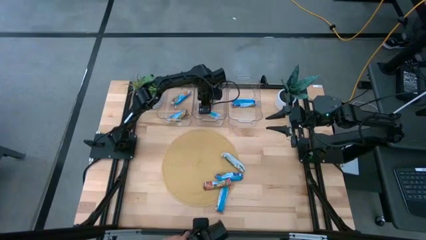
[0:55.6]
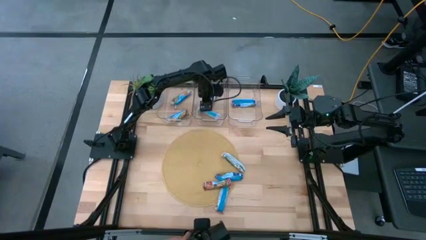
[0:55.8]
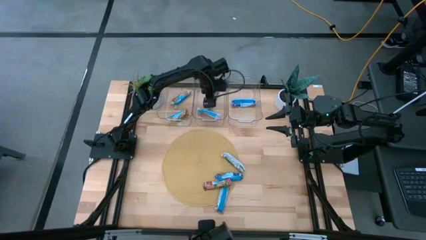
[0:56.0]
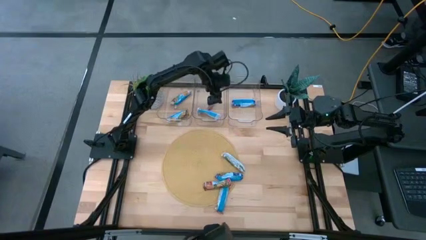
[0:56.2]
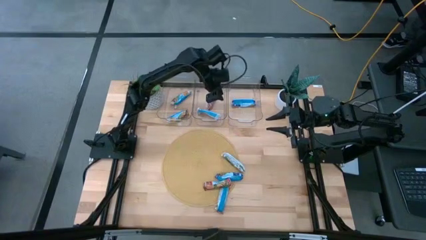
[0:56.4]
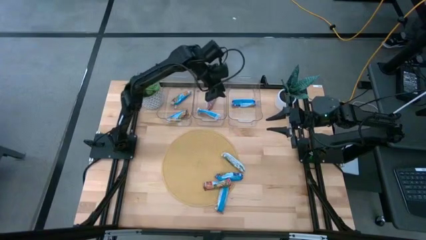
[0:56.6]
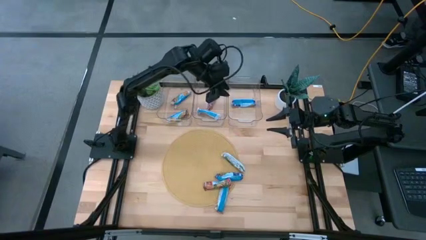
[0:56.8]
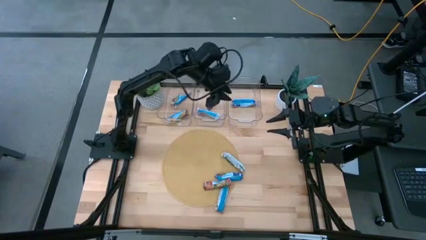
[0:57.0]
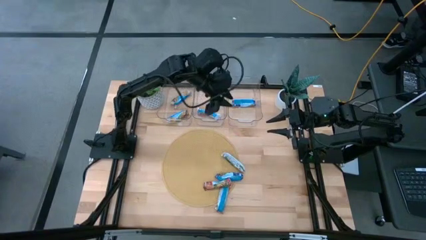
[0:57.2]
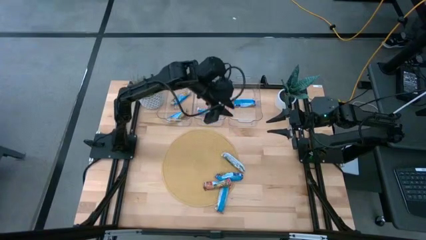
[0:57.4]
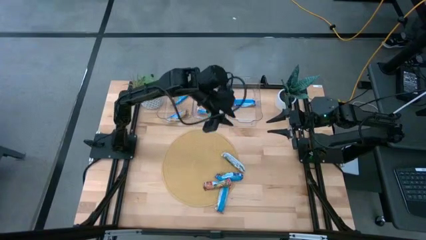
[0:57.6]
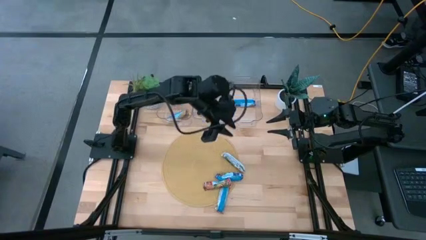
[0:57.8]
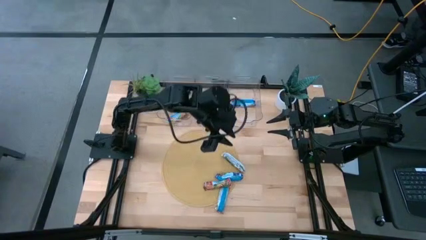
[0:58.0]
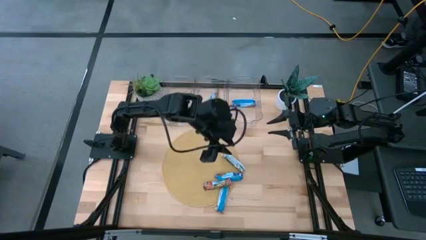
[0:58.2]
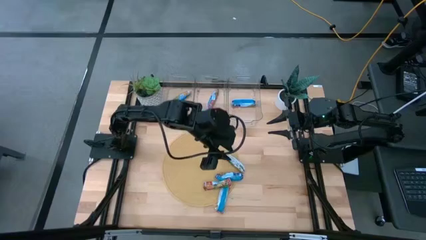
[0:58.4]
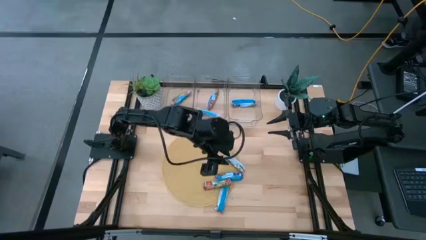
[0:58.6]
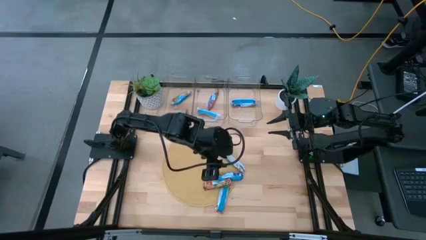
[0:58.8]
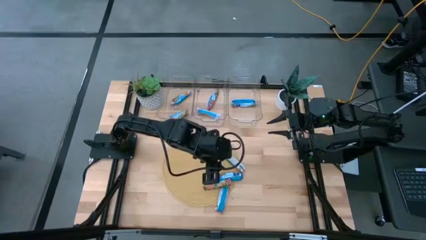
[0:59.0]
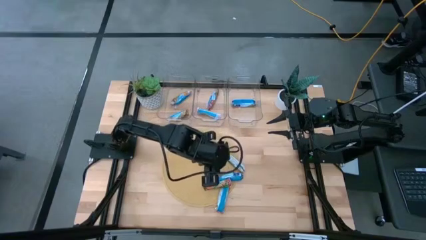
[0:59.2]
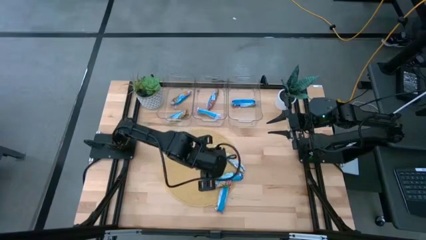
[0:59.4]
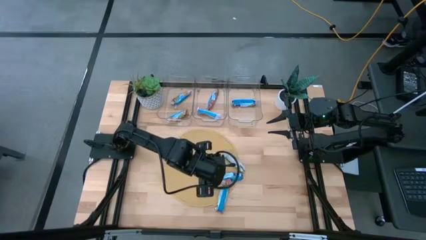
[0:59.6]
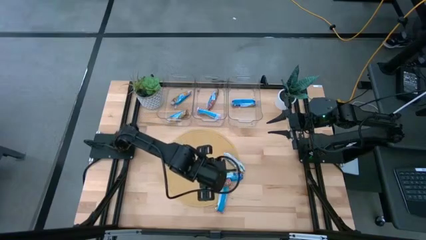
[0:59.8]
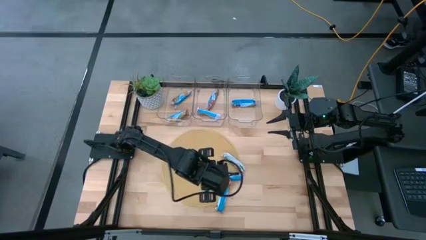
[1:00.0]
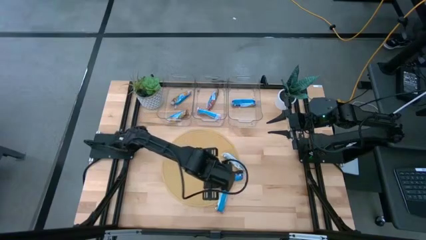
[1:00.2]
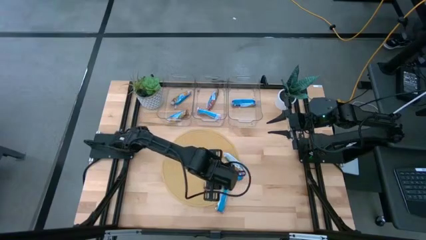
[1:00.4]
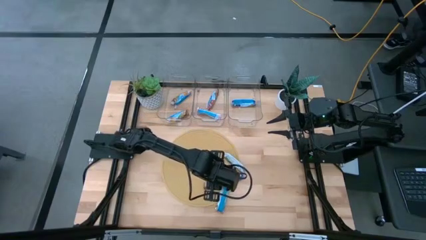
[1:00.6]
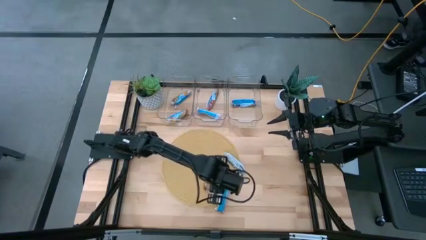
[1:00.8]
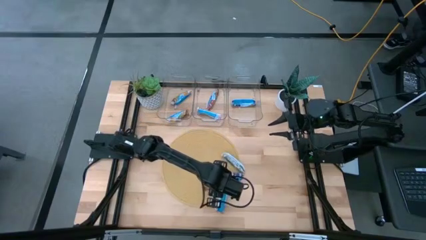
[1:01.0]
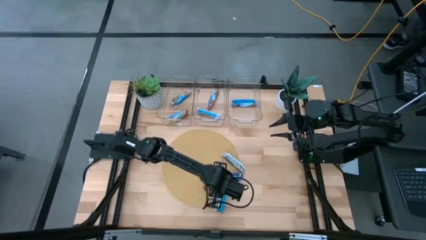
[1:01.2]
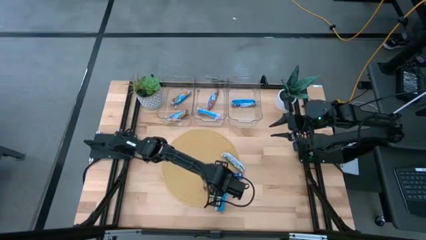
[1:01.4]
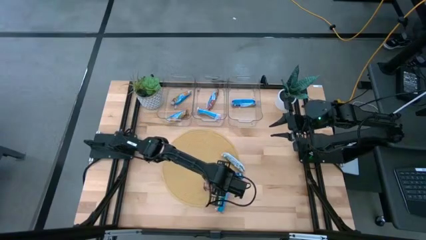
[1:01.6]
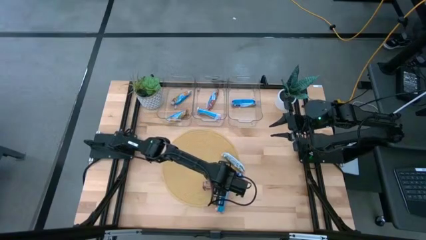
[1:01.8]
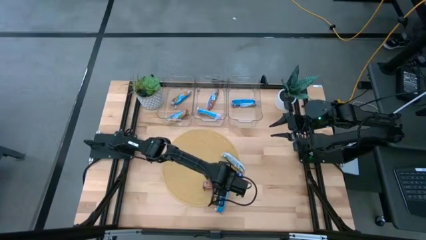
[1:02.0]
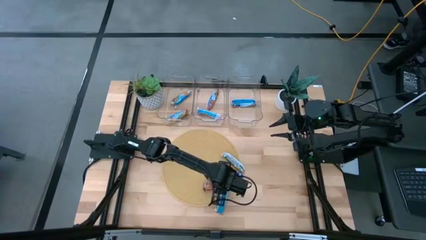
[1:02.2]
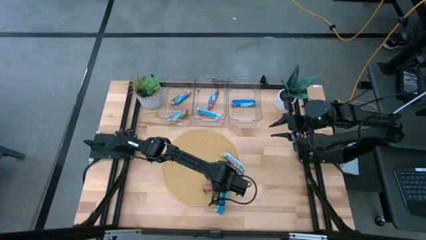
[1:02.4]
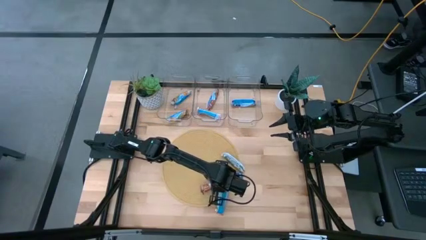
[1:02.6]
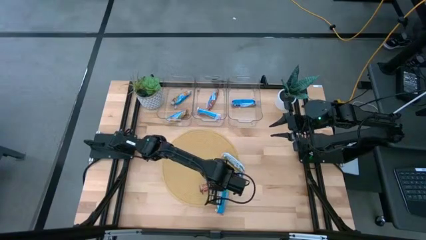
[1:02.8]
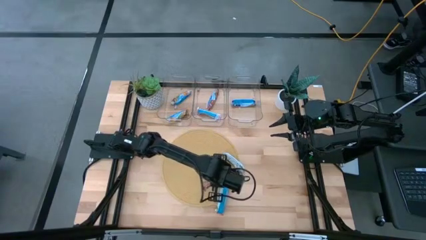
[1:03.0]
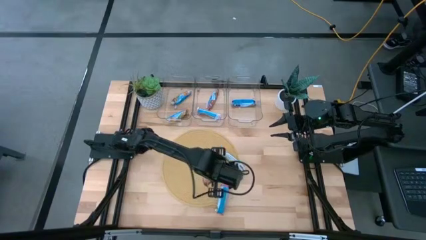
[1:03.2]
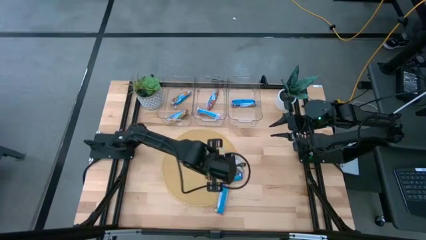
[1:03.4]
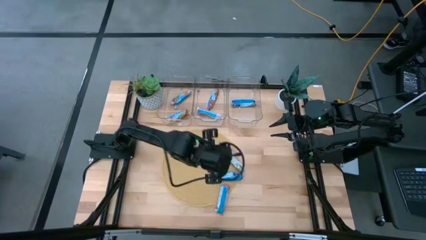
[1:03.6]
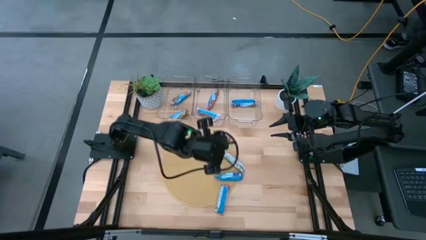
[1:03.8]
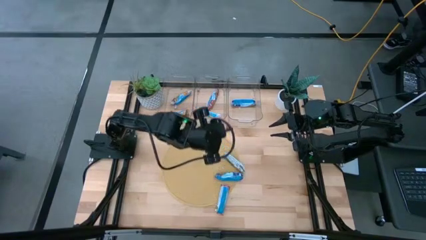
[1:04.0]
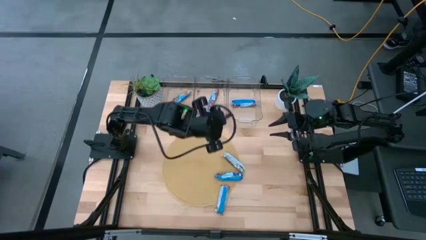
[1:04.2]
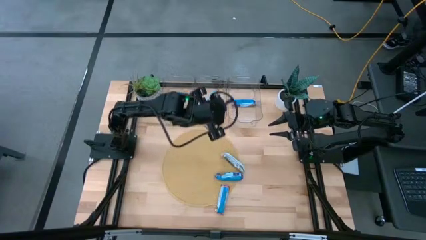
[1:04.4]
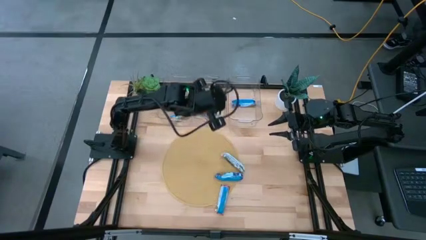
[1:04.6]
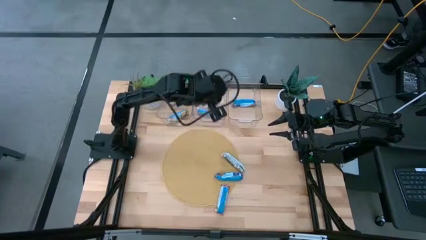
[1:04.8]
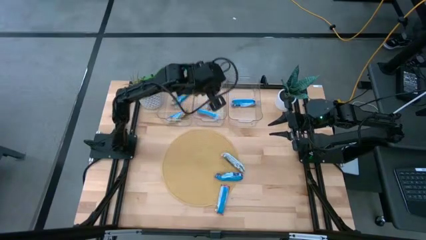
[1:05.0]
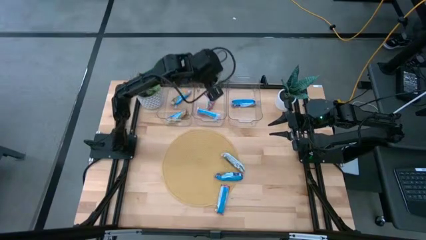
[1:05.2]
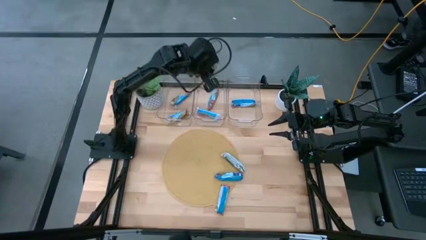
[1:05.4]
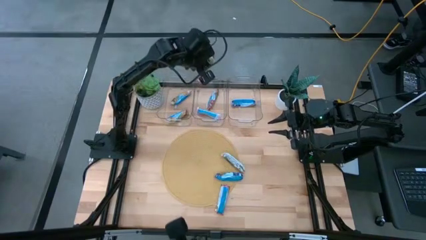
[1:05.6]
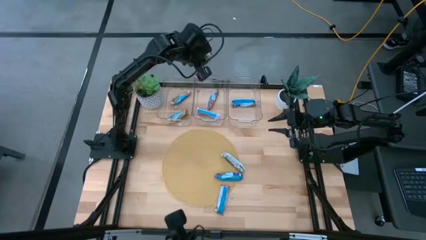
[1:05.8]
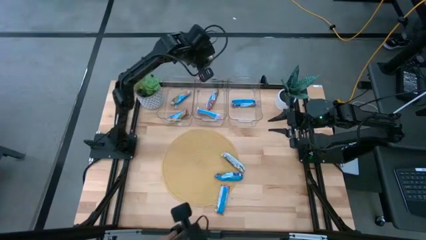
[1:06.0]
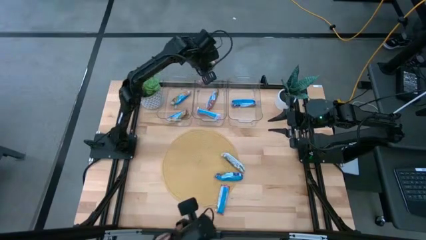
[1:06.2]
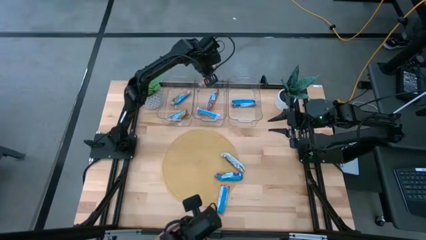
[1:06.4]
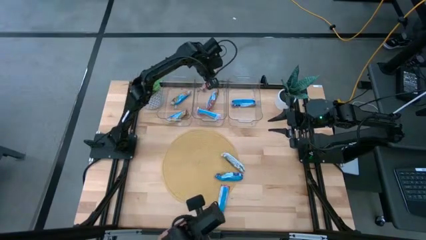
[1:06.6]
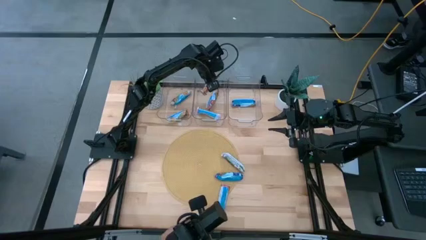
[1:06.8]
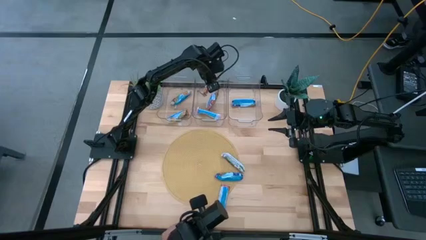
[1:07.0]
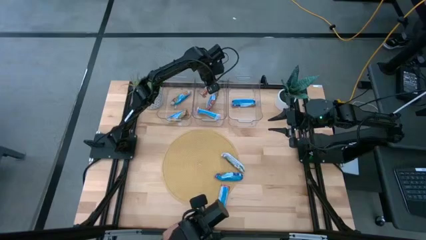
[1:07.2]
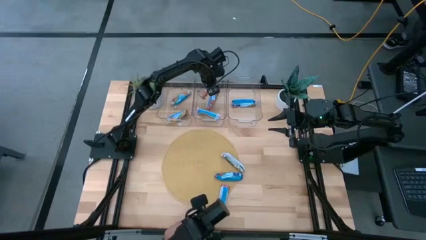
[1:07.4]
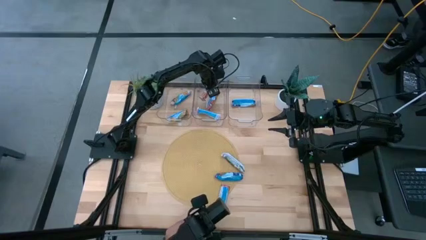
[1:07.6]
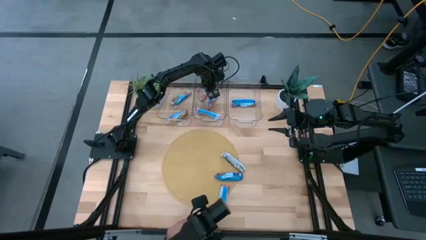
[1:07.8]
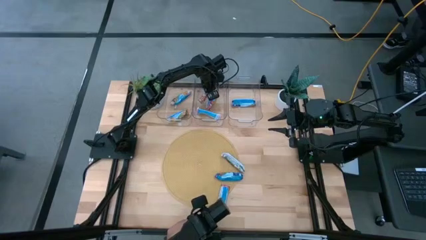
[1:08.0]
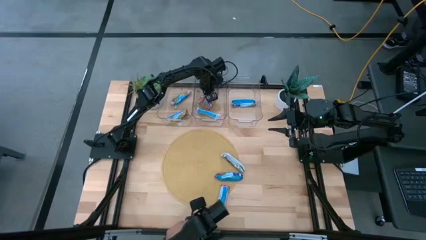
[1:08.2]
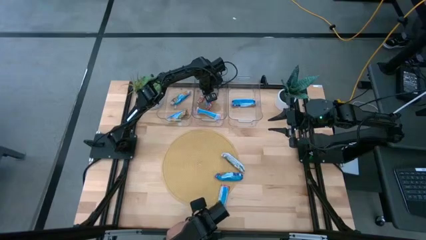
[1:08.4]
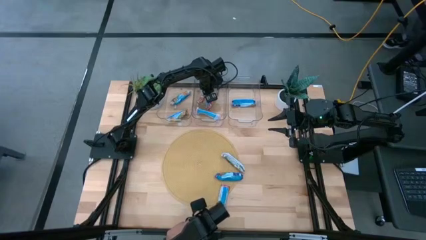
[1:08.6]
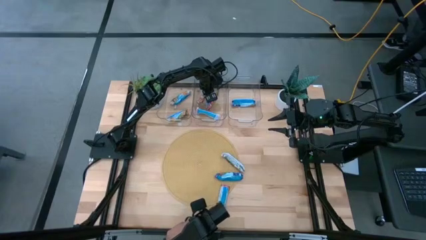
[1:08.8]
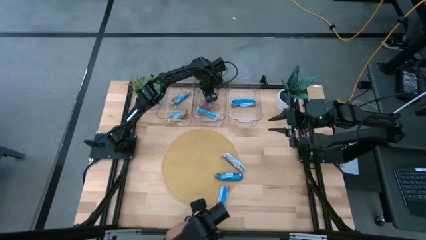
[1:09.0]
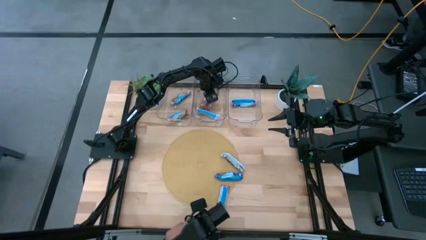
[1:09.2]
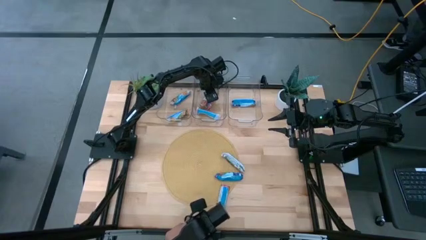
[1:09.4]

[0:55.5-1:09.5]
Task: Pick and place Granola Bars by type
Put the red granola bar into the middle transparent bin

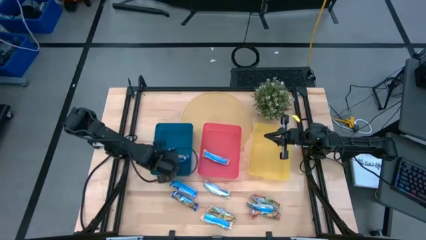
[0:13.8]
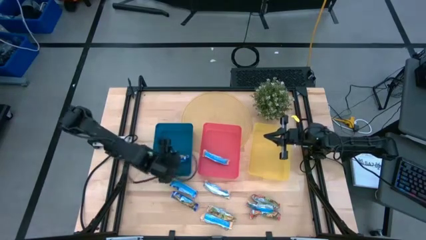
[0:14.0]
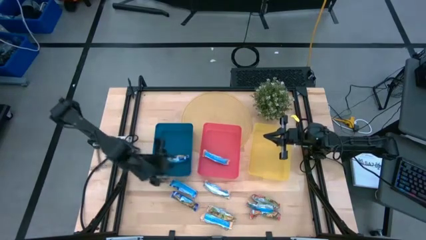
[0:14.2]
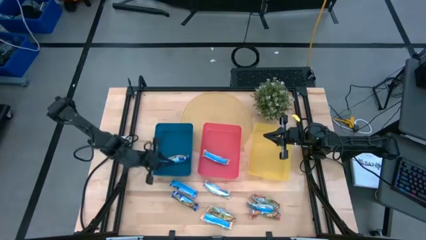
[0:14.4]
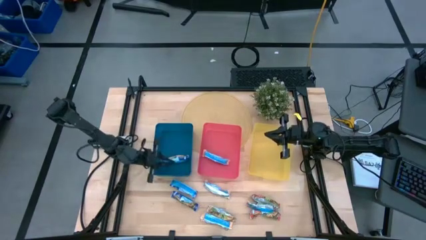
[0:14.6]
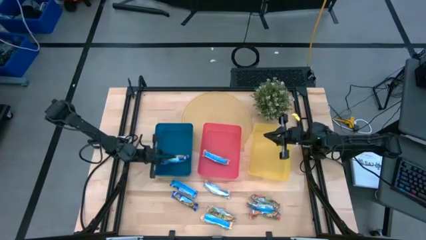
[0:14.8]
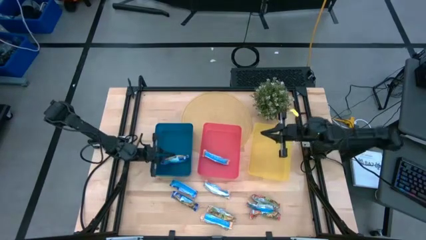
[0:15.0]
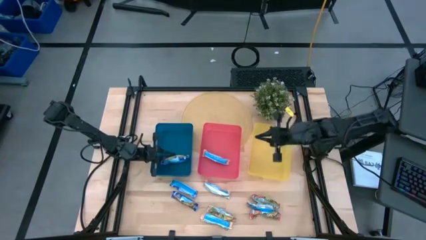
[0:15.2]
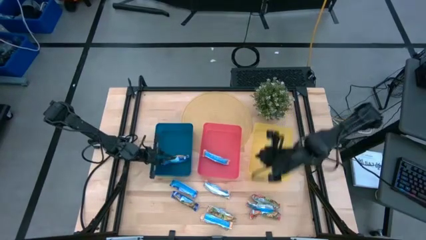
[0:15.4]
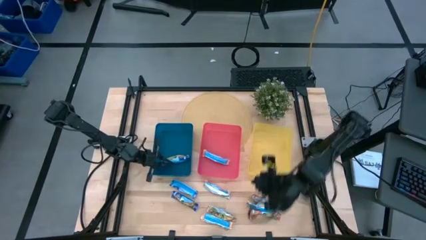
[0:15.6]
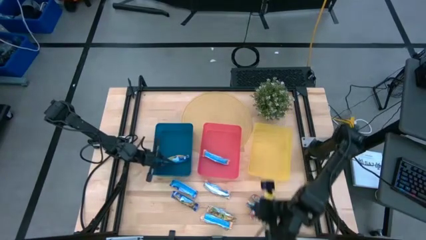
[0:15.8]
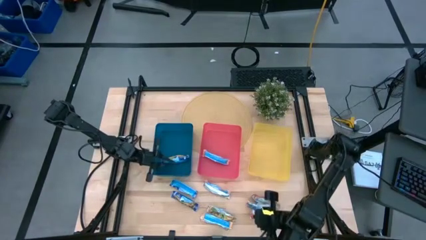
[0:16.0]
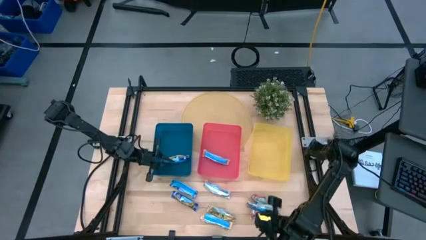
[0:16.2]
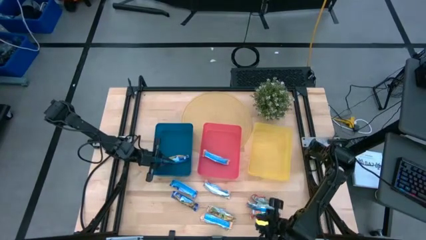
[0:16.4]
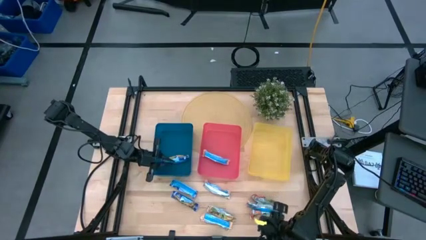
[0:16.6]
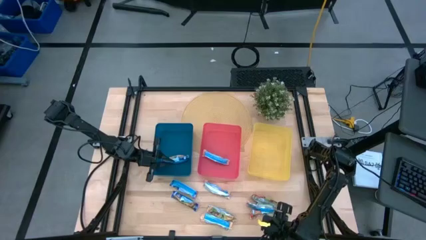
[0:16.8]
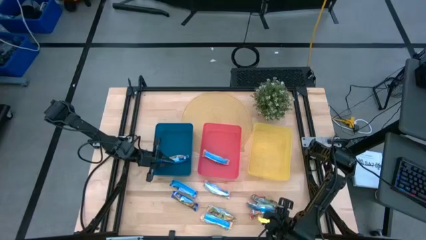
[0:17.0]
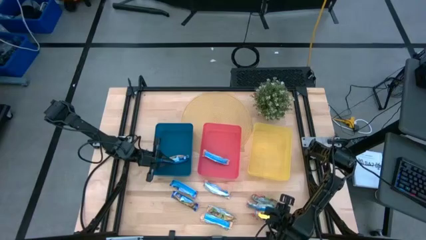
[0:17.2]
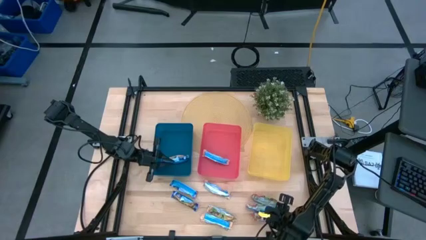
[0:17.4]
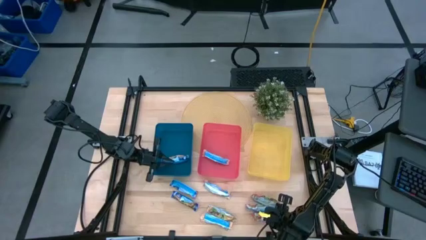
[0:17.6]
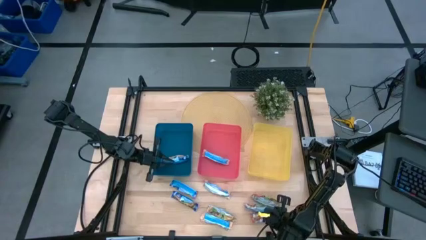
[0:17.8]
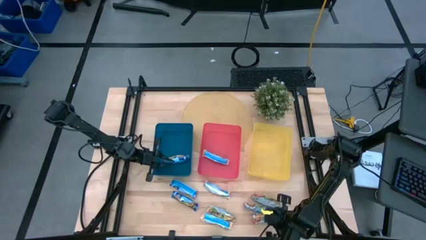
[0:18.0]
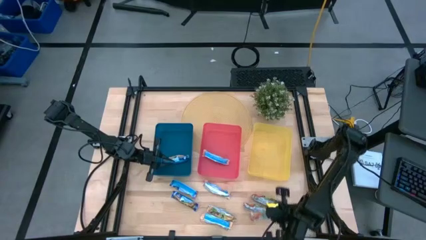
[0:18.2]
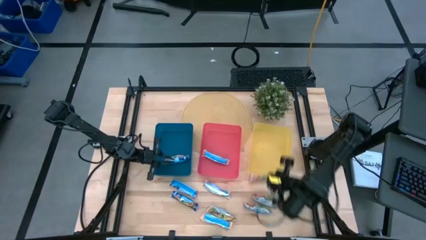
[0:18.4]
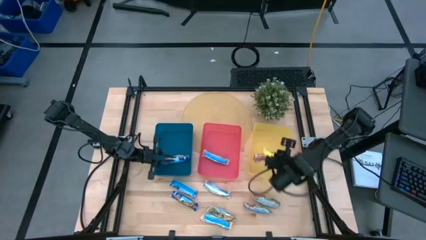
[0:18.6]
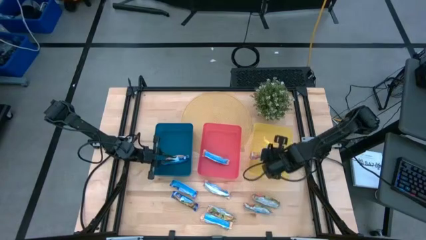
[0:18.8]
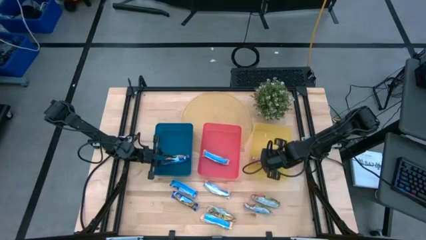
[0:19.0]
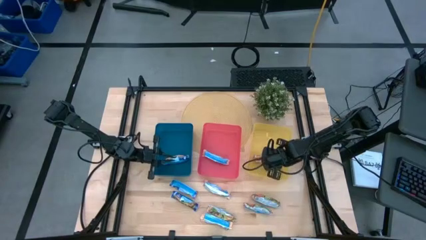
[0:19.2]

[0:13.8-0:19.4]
Task: Pick and place Granola Bars by type
Put the red granola bar into the yellow bin
